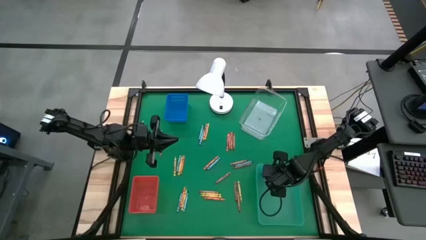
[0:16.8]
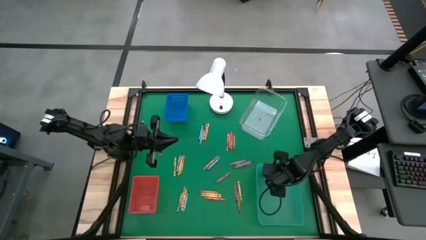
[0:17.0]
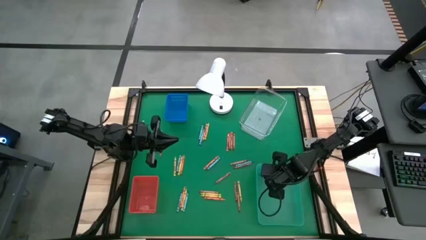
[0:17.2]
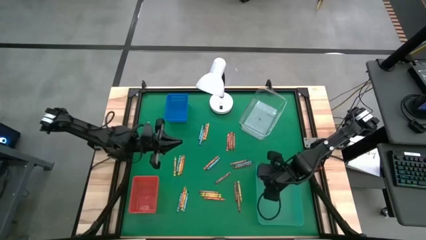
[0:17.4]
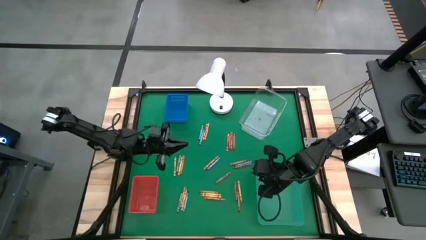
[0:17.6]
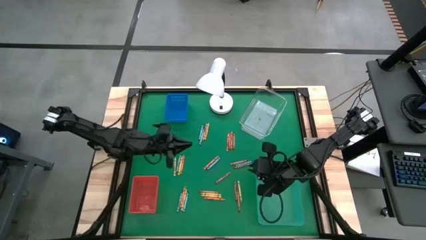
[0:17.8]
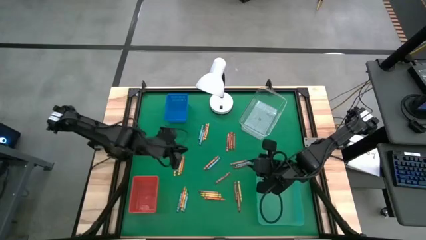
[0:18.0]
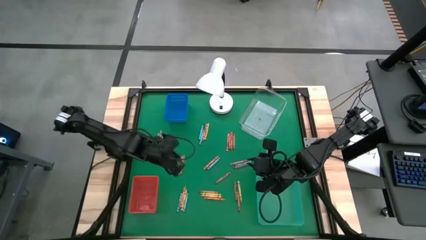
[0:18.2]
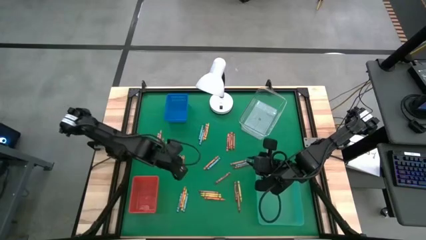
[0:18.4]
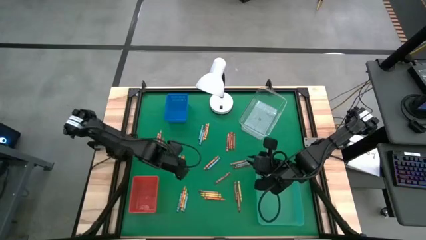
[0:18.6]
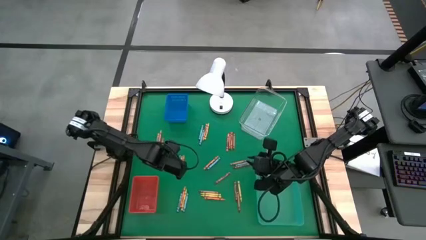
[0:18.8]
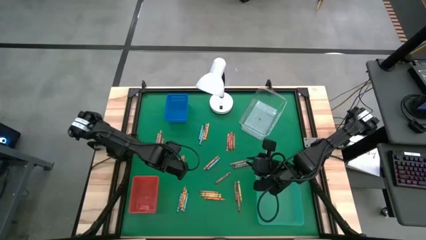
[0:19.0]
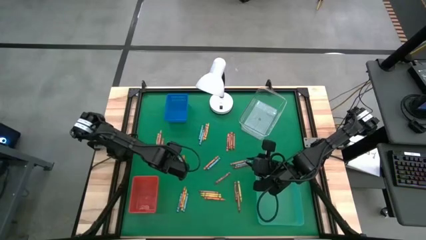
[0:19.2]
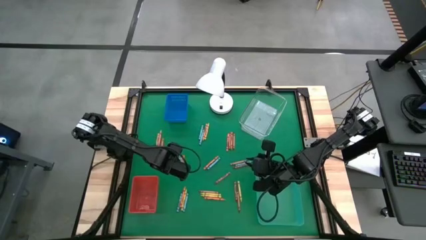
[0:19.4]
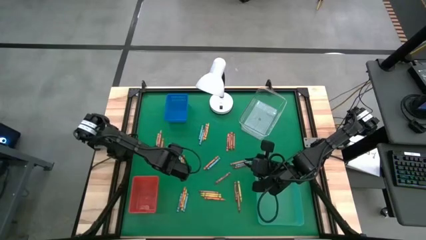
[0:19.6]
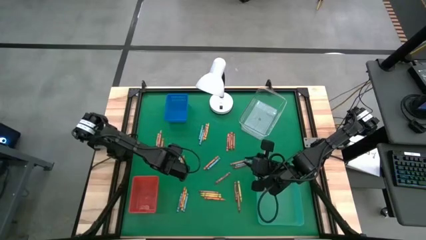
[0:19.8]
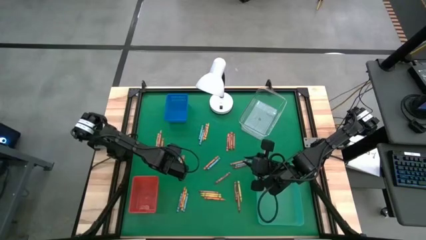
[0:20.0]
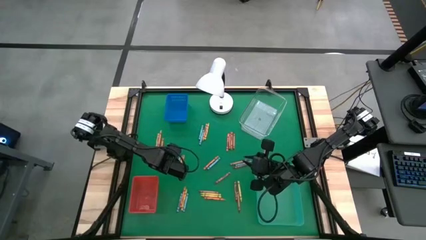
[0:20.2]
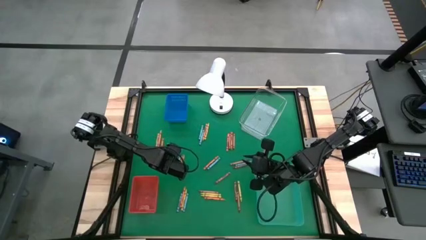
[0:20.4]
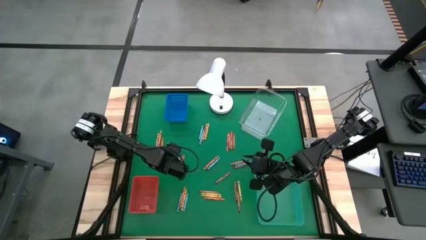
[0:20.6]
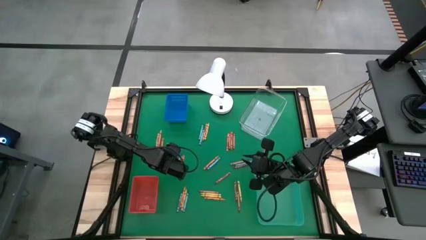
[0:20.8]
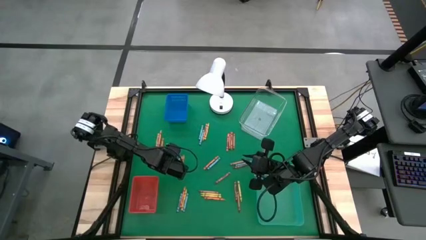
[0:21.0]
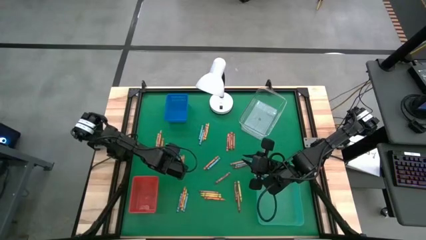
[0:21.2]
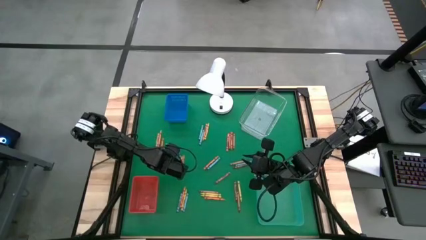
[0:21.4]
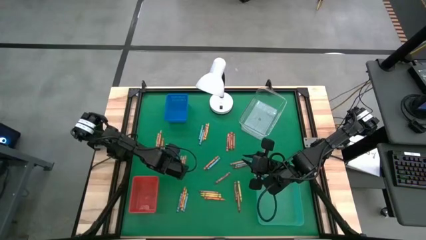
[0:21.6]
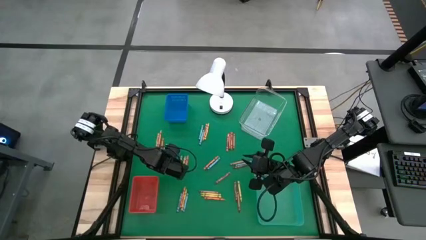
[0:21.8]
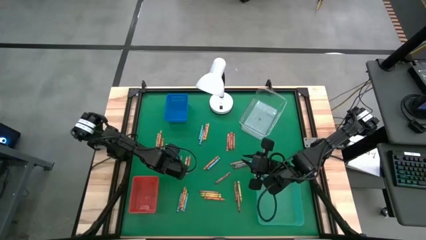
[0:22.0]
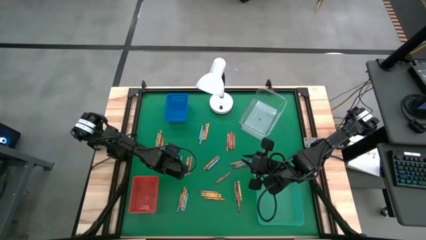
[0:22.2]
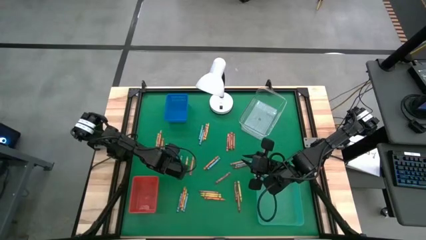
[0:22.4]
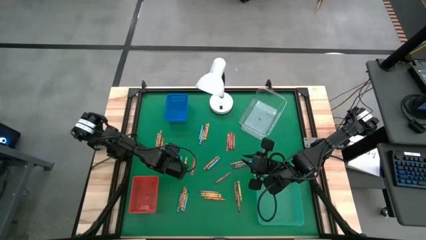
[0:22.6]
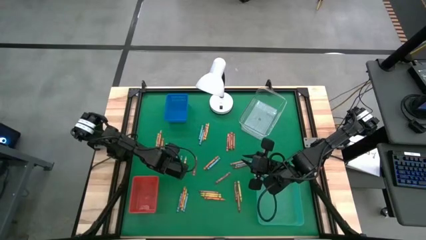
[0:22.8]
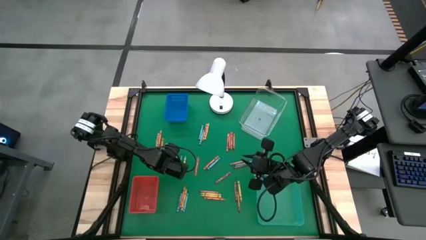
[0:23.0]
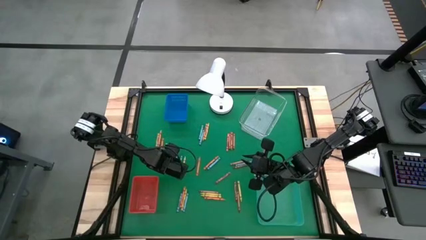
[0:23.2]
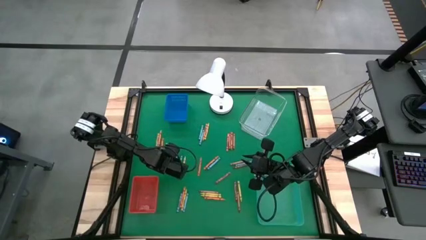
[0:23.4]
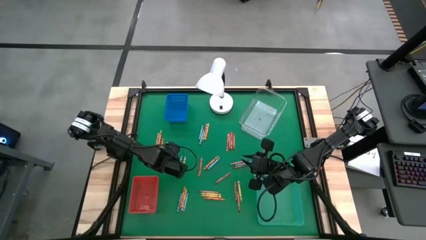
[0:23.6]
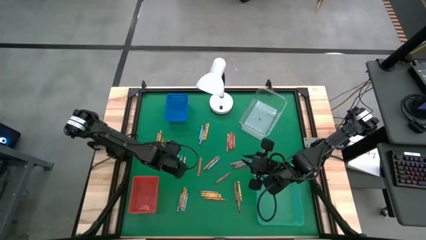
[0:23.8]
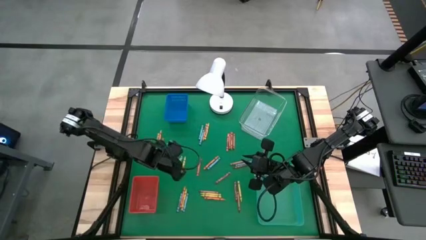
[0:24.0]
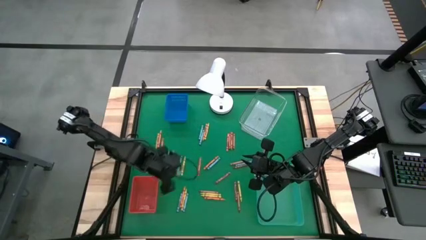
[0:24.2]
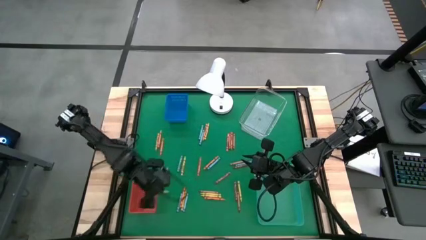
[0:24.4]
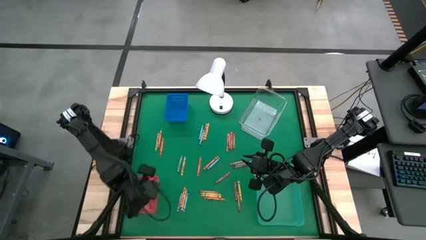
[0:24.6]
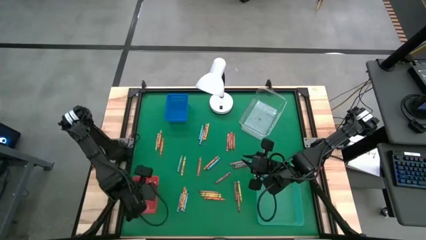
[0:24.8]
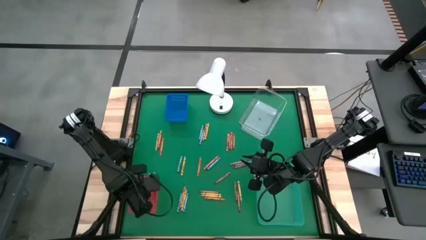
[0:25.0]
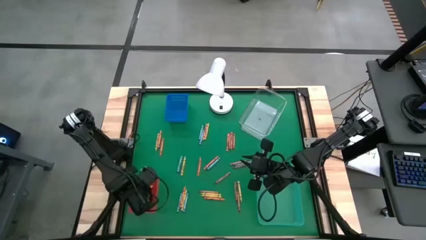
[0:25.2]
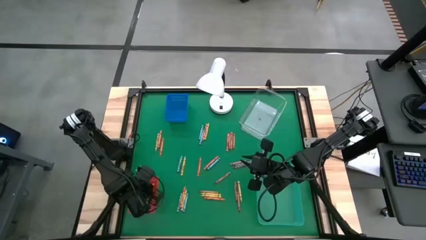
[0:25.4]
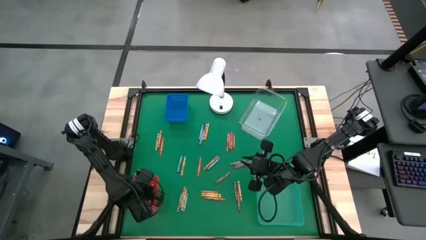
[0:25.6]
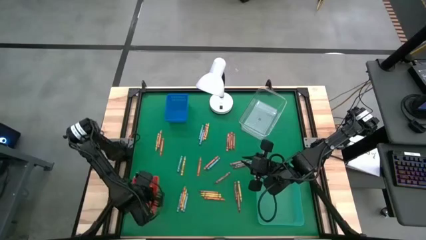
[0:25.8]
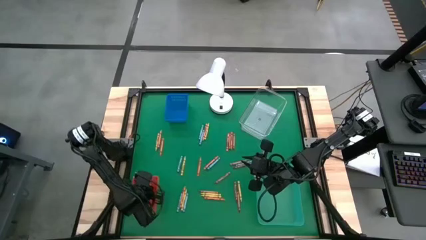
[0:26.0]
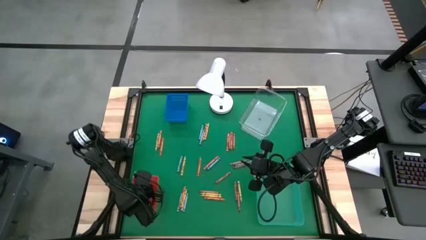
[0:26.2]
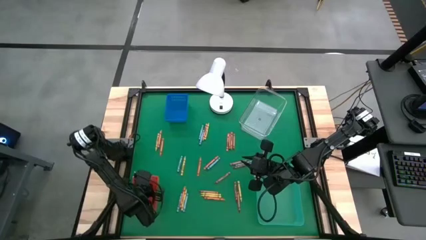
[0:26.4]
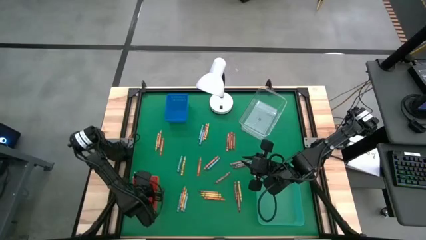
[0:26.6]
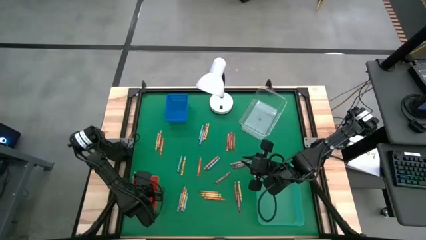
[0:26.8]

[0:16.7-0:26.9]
Task: Sort crayons
Put the yellow crayon into the red bin

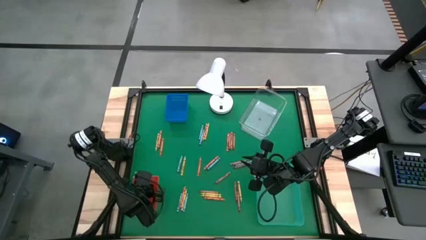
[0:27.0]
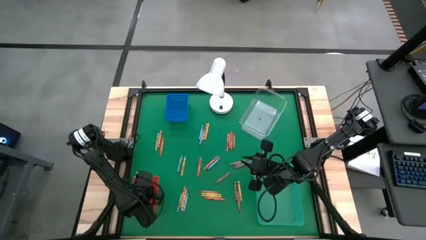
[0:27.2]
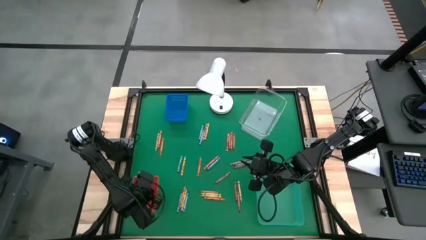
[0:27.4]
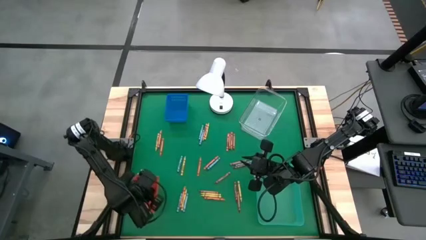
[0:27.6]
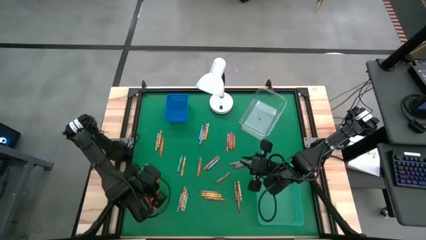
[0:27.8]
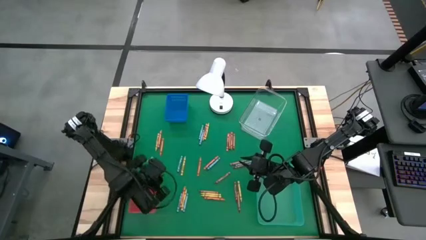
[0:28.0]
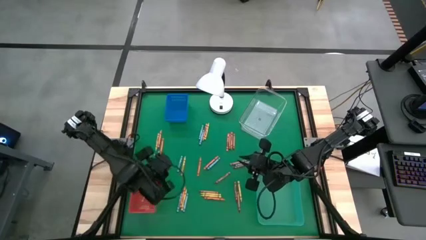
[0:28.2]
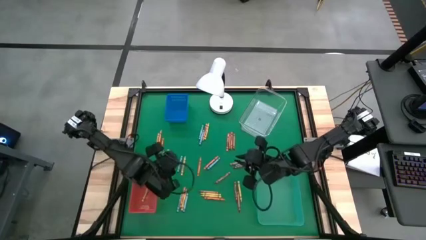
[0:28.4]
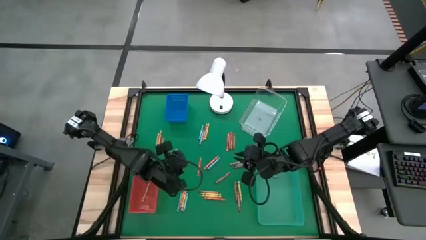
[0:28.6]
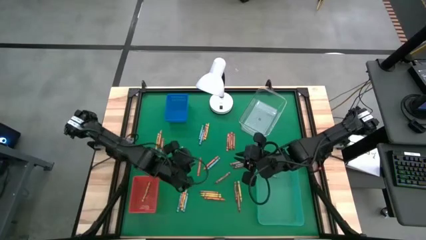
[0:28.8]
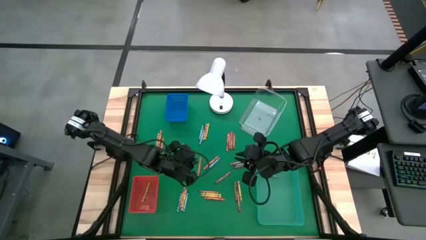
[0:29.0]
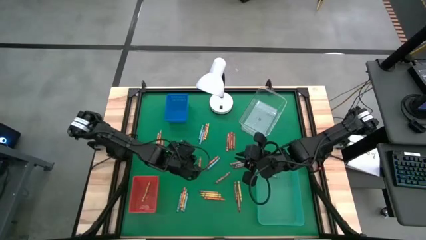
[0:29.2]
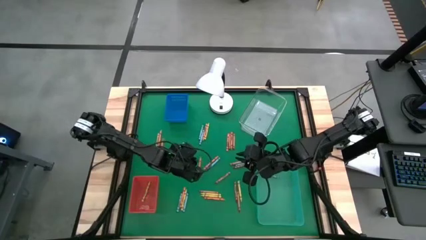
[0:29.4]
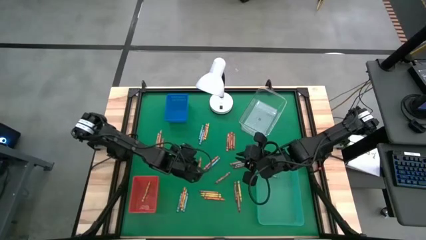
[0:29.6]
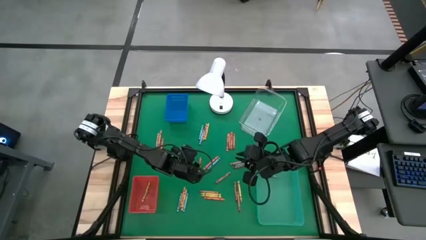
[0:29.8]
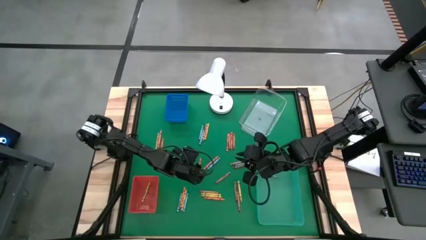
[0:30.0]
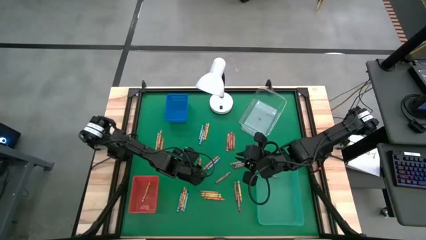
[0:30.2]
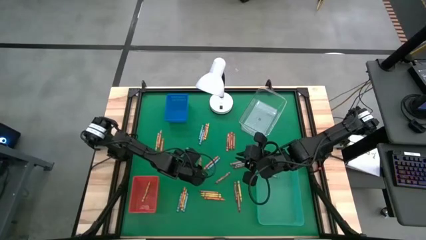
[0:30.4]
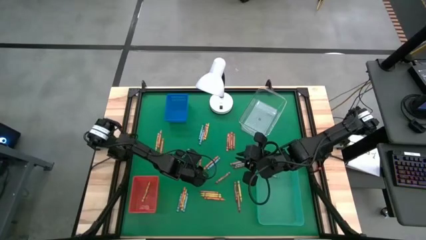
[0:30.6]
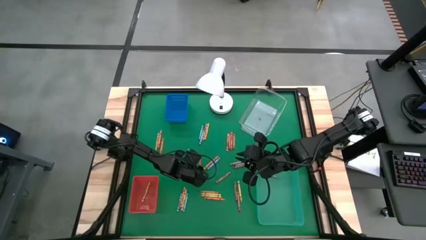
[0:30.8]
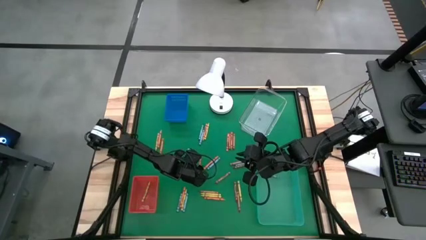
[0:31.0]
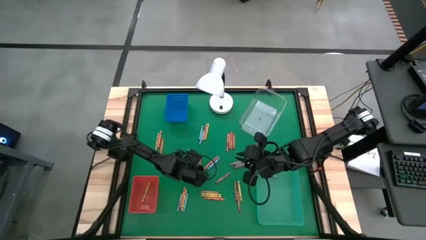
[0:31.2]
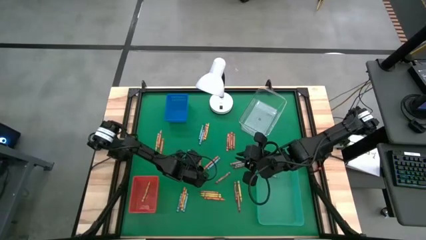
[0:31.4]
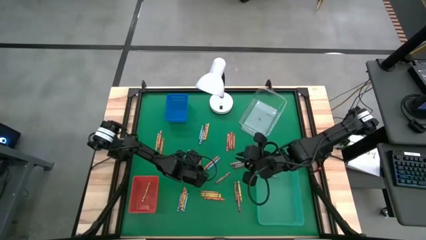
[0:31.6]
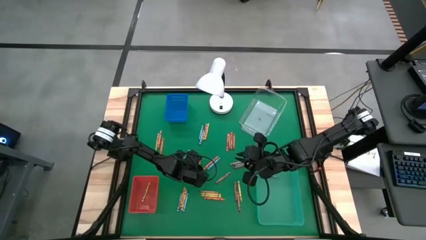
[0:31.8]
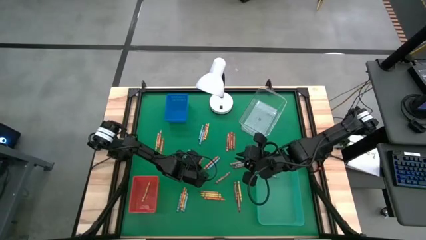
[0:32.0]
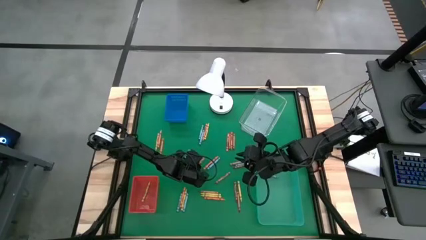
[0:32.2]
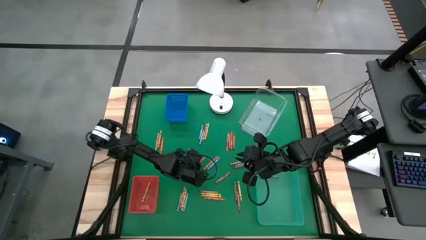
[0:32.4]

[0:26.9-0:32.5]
Put the orange crayon into the transparent bin
